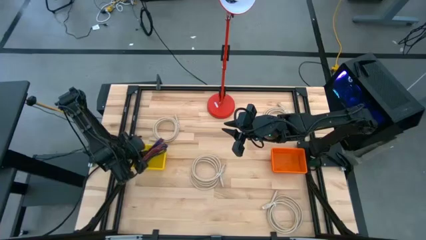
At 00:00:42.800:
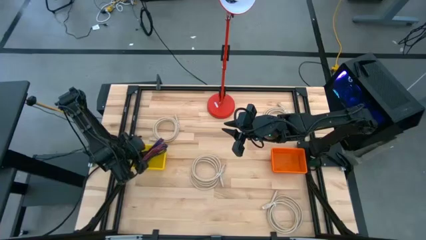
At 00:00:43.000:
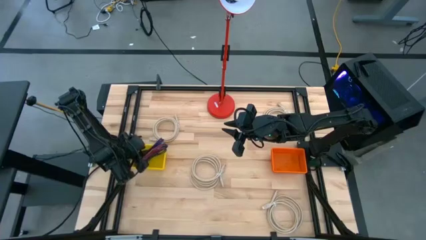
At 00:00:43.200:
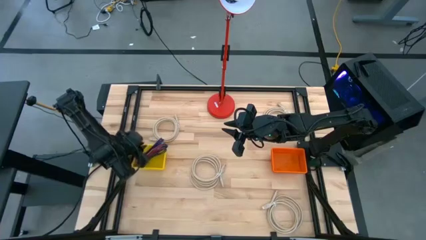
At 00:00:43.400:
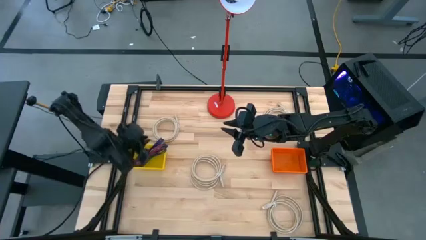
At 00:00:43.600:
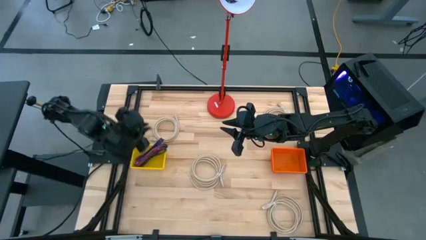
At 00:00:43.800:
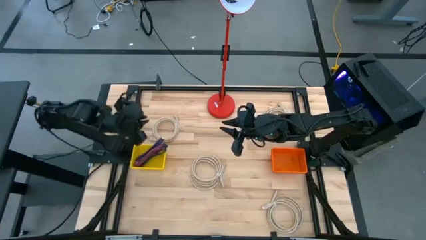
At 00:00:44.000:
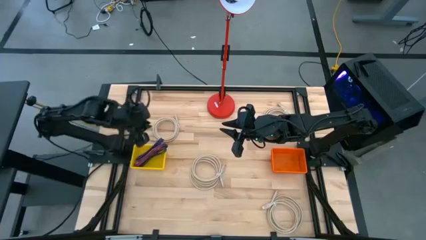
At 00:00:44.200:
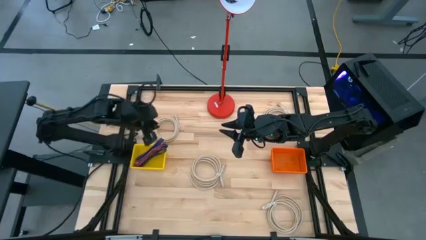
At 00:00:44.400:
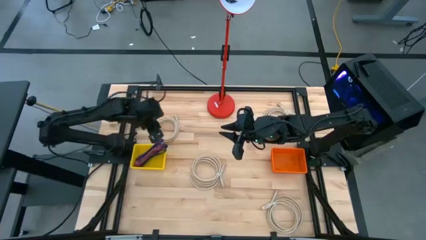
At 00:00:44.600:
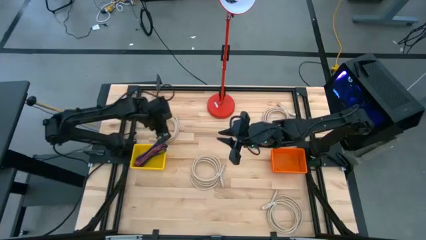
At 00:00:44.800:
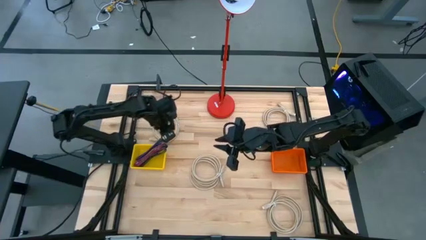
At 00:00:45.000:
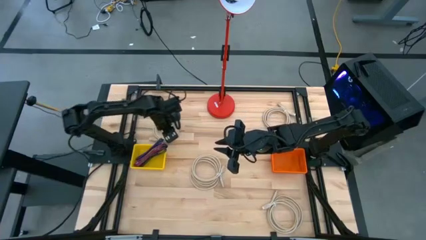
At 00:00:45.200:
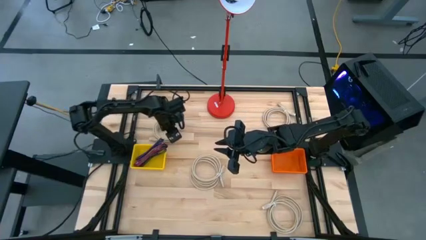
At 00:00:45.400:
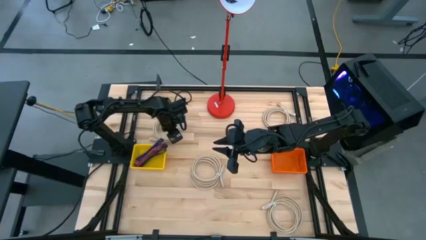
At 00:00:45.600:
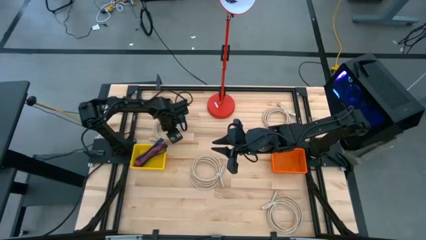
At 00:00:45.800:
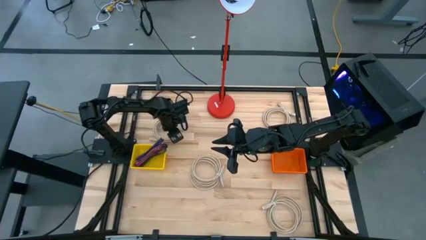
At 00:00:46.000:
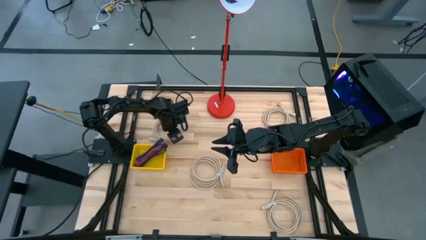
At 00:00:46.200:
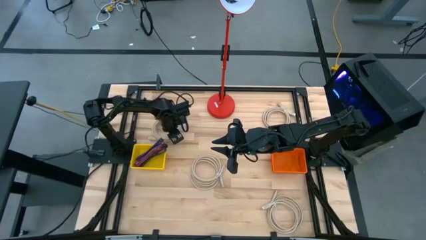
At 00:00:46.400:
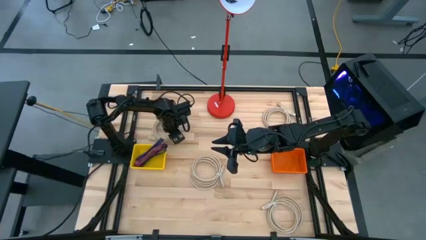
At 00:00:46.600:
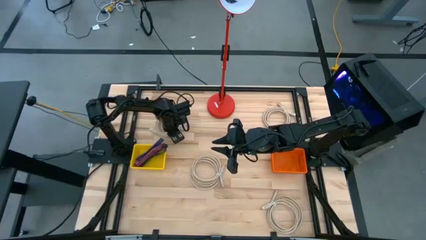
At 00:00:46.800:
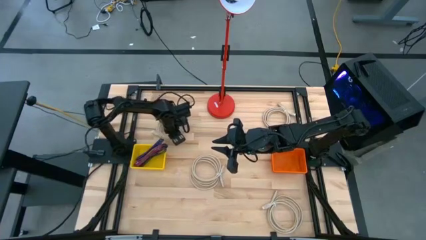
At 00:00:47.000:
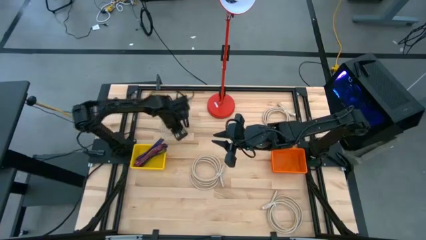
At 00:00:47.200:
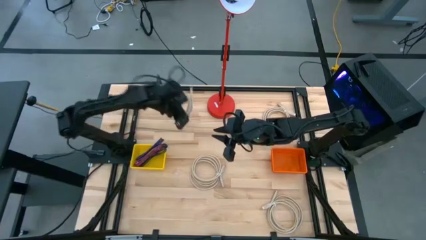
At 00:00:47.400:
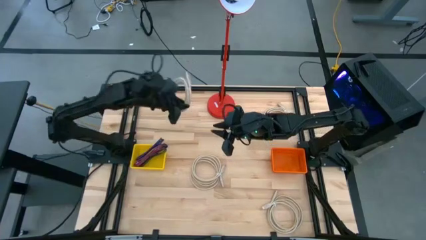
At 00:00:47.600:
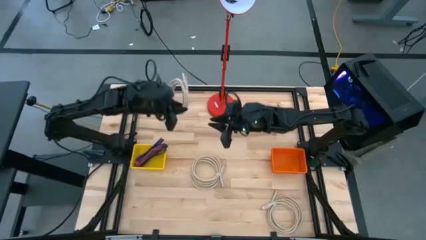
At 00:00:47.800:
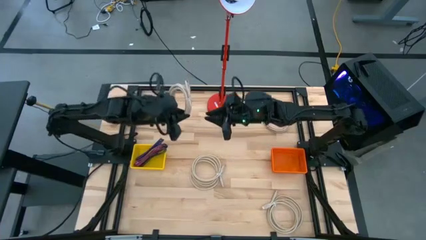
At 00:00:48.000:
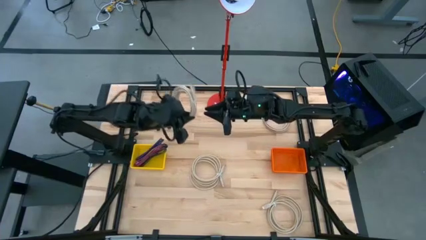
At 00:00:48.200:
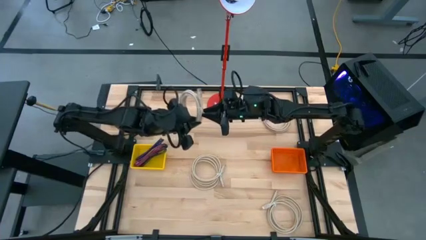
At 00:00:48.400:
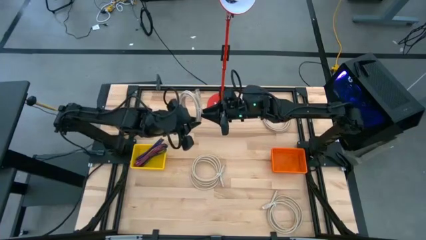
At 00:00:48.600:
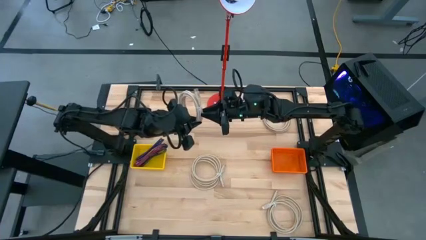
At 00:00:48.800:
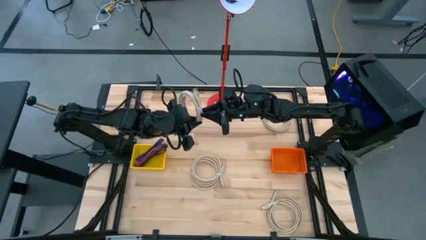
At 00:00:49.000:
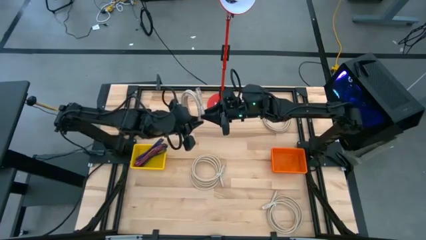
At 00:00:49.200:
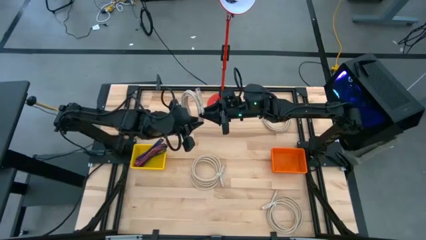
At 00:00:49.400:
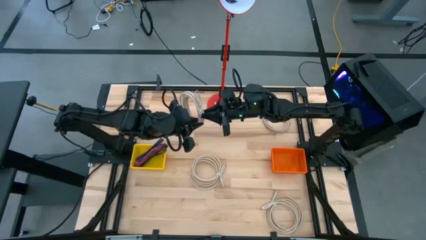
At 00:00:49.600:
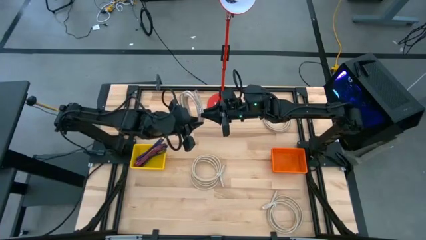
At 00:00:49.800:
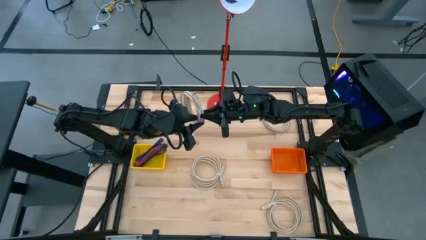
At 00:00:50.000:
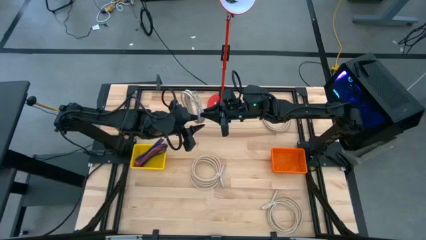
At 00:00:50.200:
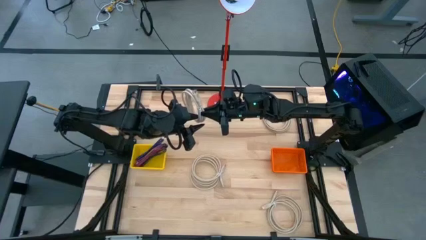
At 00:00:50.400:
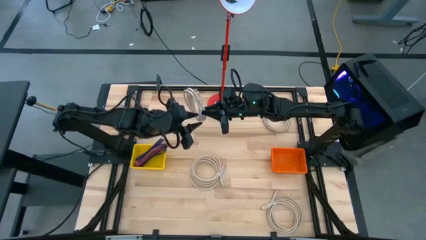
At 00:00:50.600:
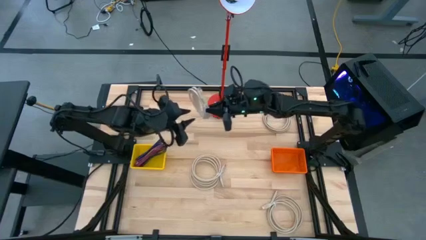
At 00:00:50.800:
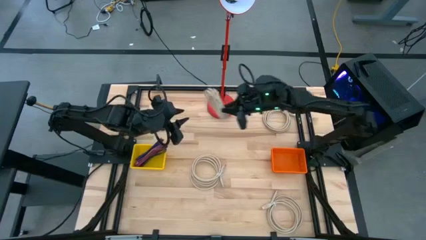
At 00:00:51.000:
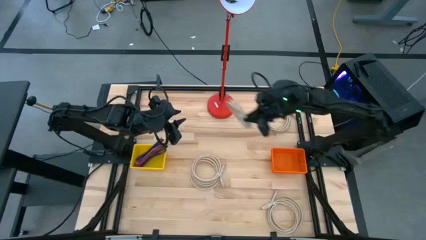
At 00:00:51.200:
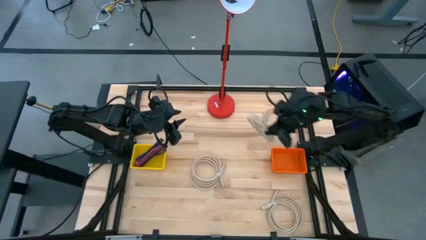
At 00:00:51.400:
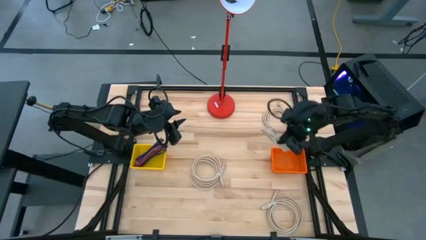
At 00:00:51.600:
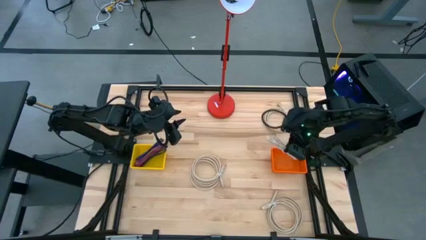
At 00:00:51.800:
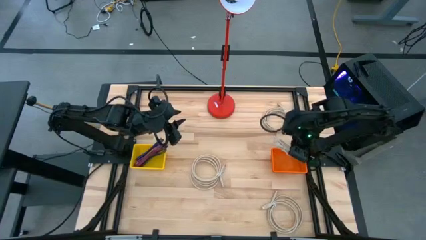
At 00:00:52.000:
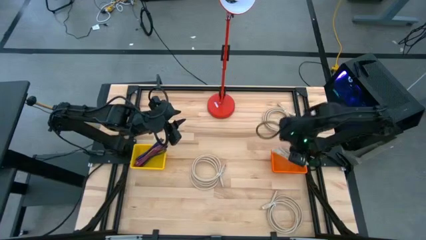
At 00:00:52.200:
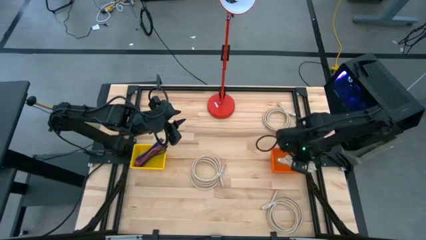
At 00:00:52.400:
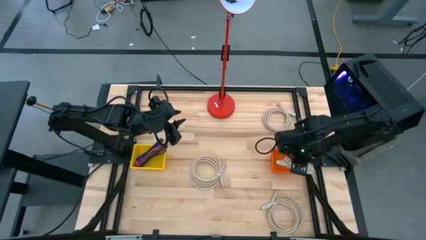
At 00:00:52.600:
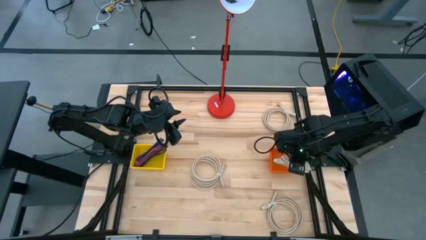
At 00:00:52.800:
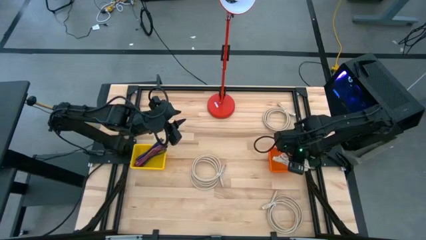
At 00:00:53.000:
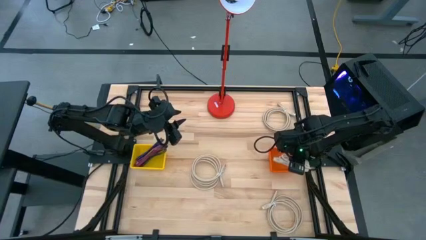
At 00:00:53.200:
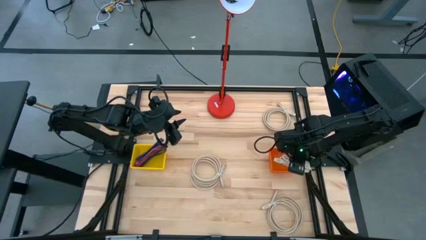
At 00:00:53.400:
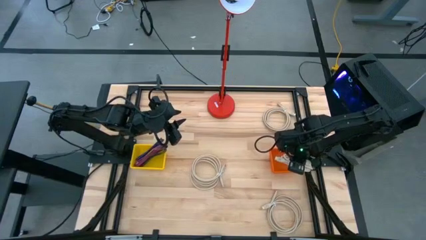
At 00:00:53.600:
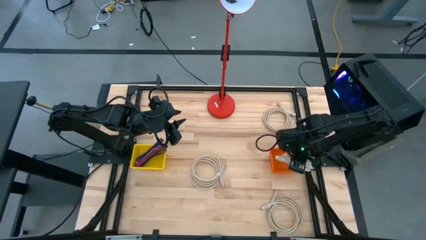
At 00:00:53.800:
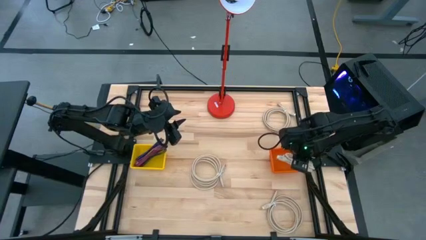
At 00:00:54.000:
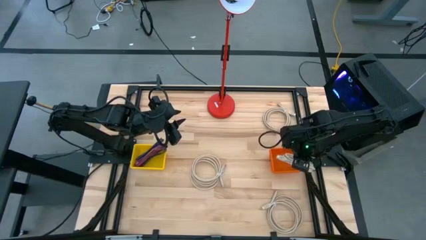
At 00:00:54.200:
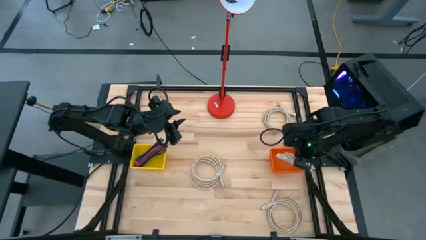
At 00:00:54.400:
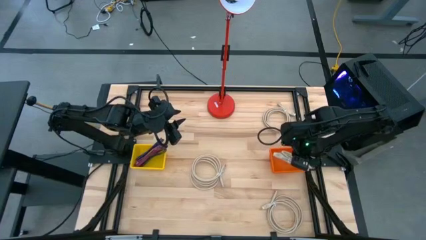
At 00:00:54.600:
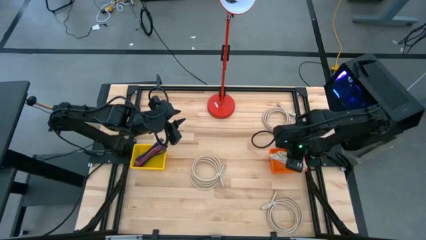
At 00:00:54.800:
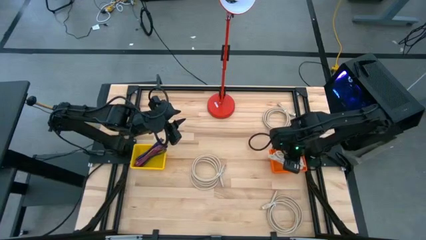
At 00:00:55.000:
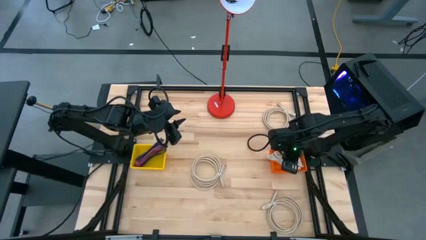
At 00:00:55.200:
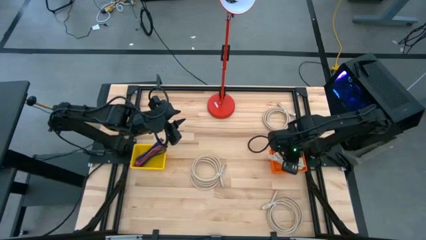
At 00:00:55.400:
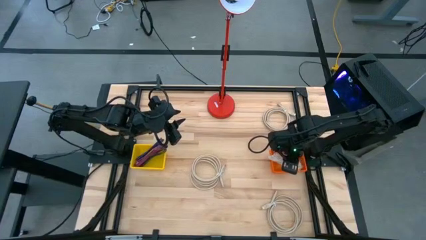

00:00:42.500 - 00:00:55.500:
Task: Pick & Place USB Port
Put the brown HDMI cable into the orange bin
